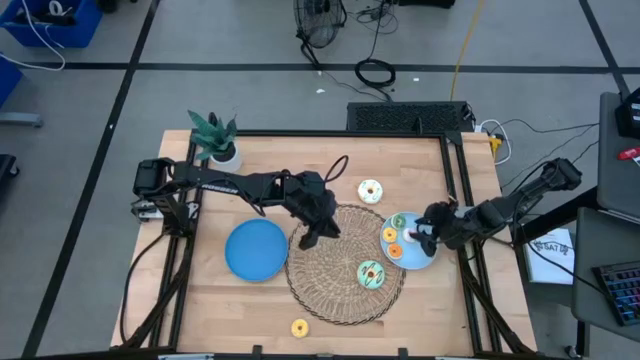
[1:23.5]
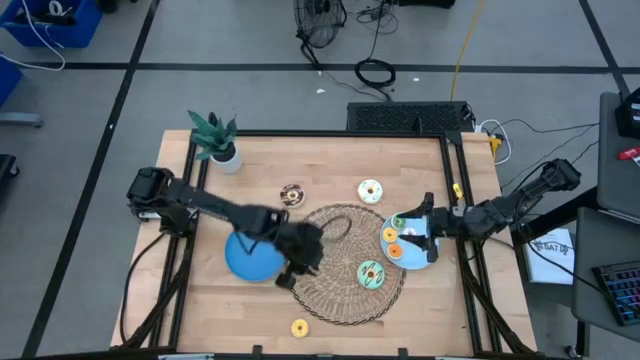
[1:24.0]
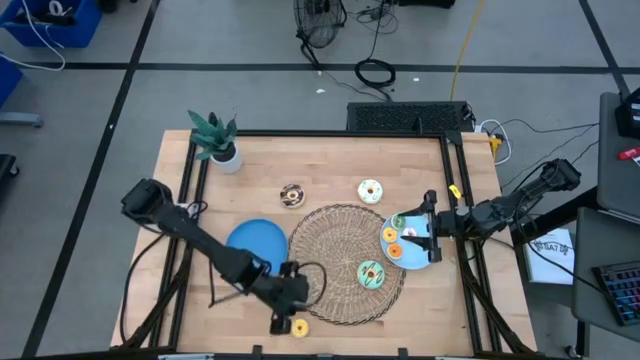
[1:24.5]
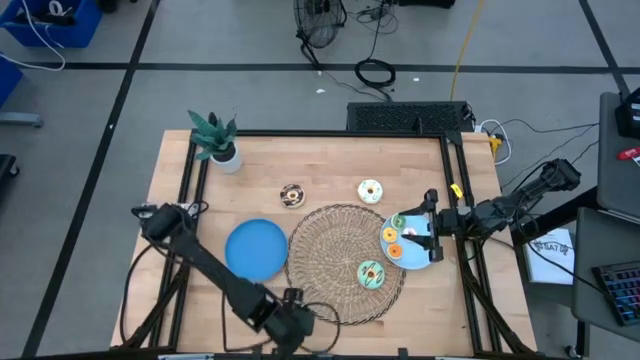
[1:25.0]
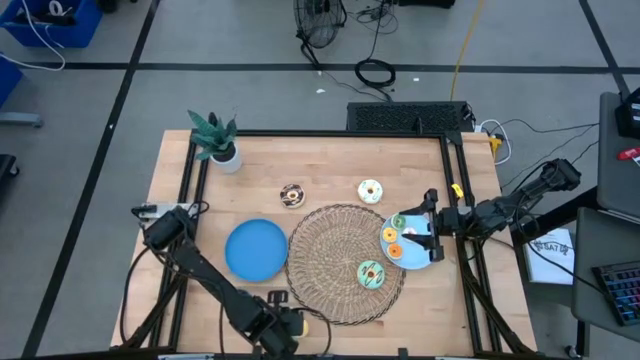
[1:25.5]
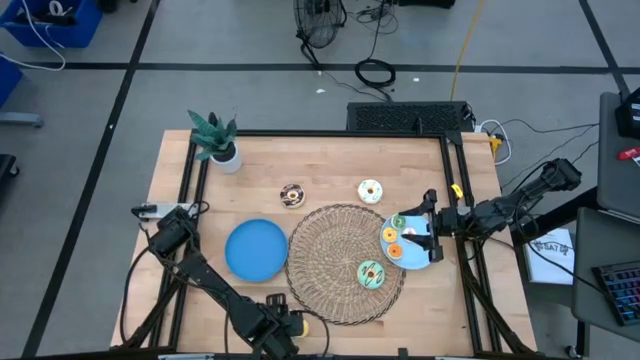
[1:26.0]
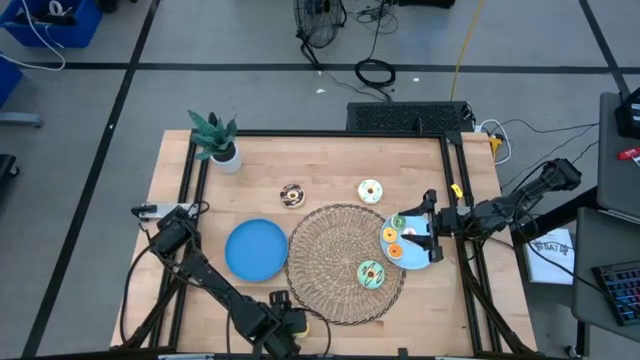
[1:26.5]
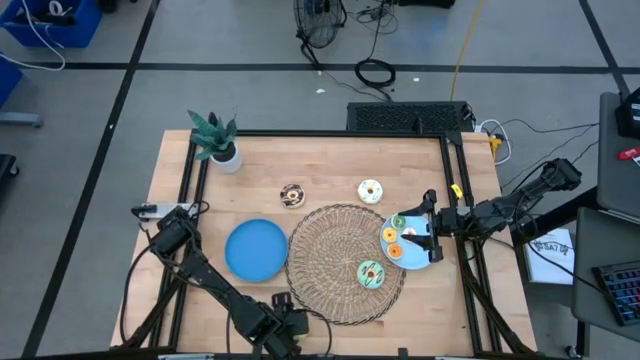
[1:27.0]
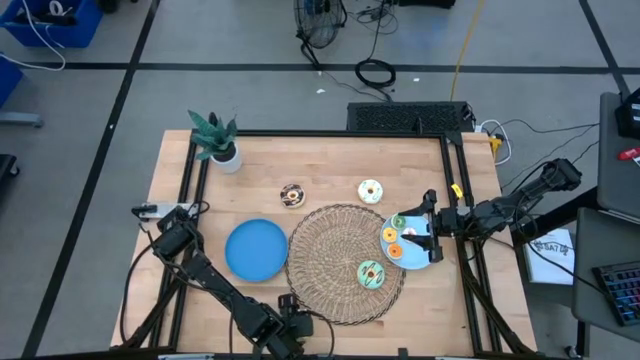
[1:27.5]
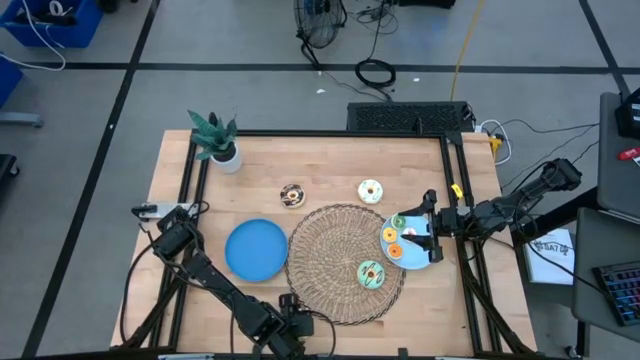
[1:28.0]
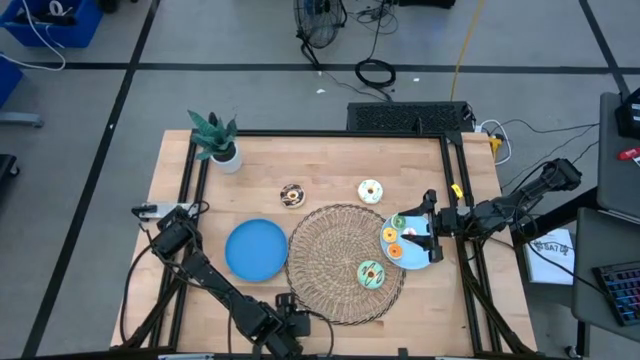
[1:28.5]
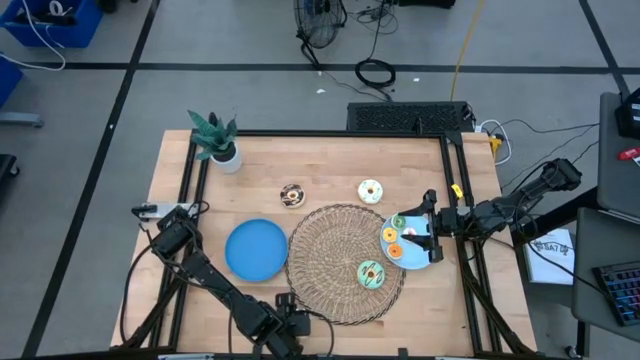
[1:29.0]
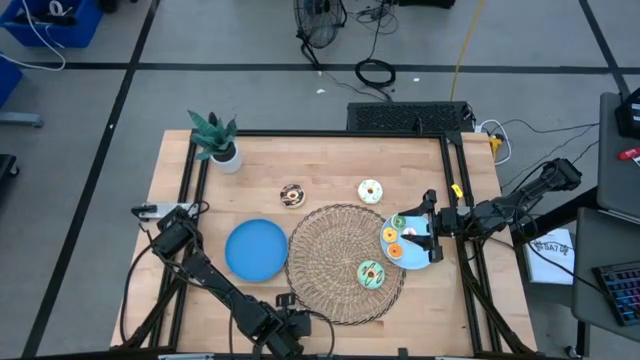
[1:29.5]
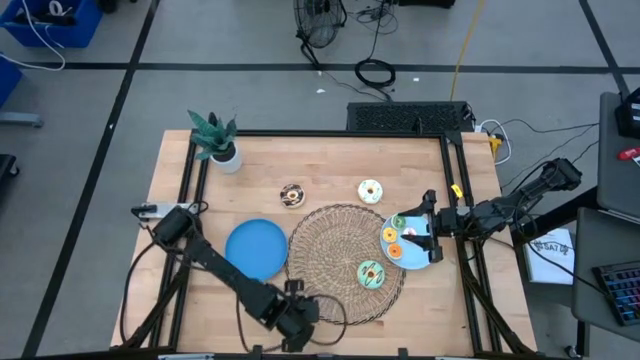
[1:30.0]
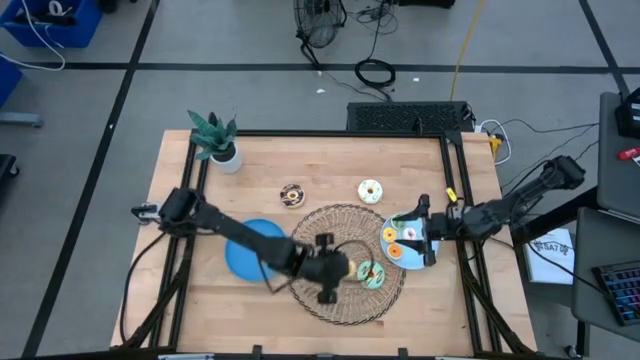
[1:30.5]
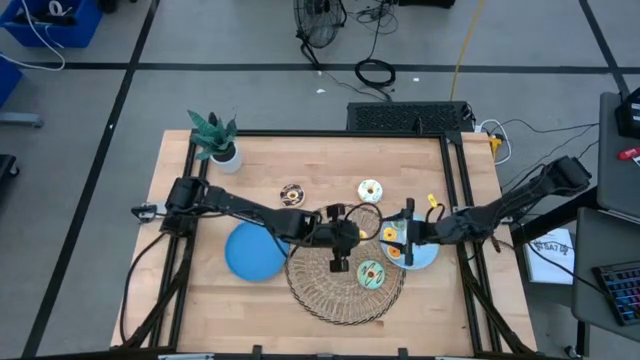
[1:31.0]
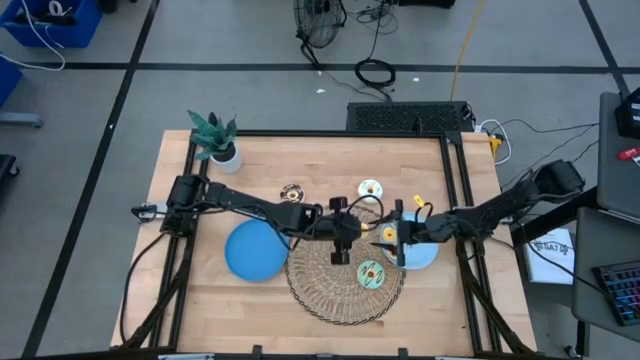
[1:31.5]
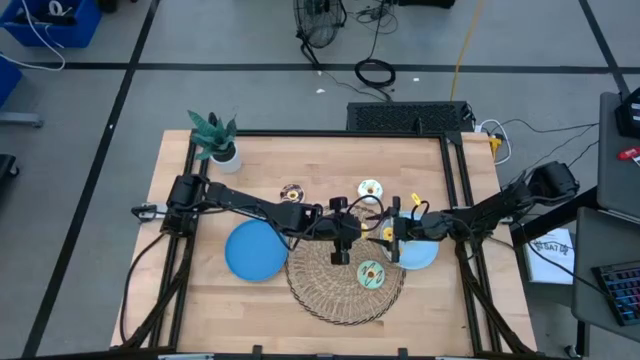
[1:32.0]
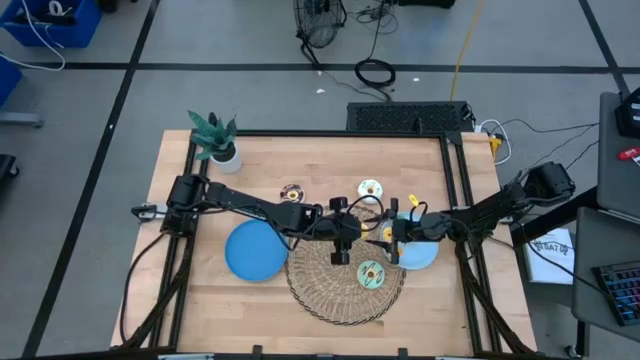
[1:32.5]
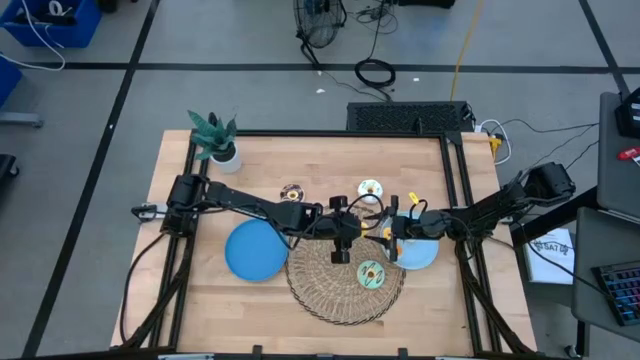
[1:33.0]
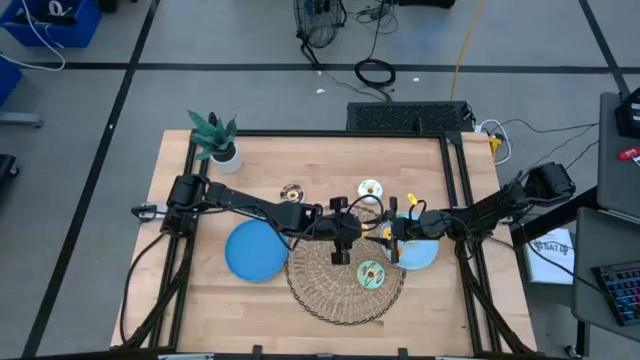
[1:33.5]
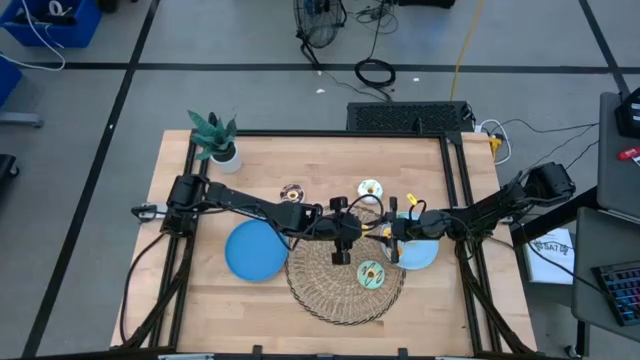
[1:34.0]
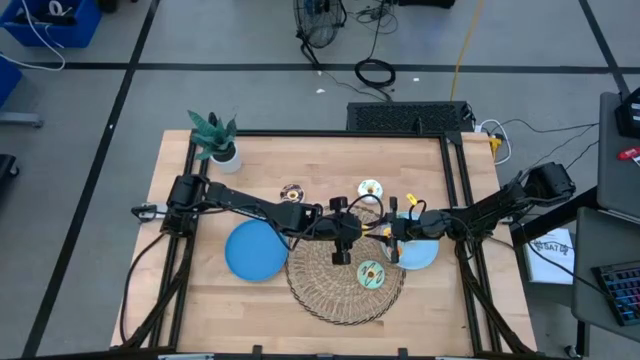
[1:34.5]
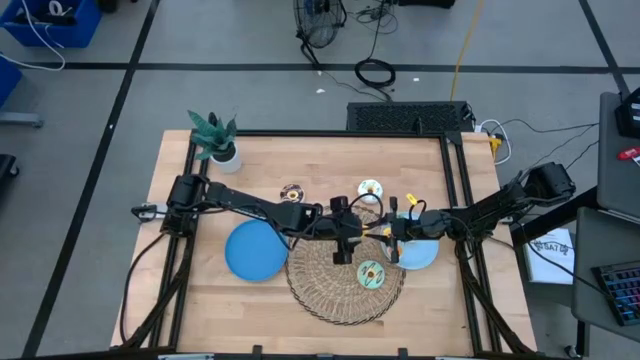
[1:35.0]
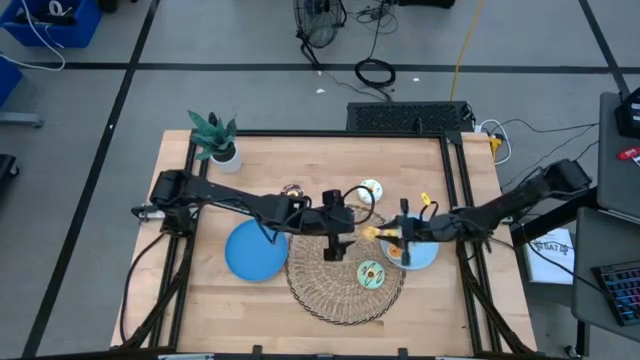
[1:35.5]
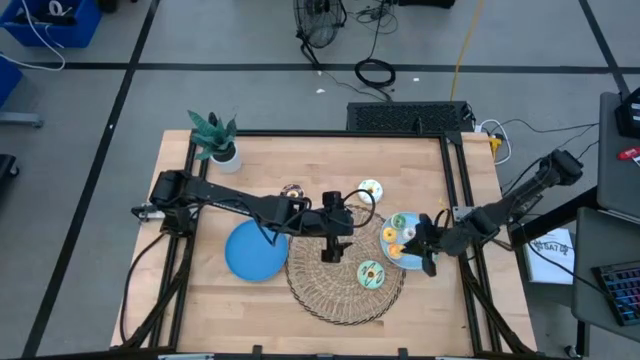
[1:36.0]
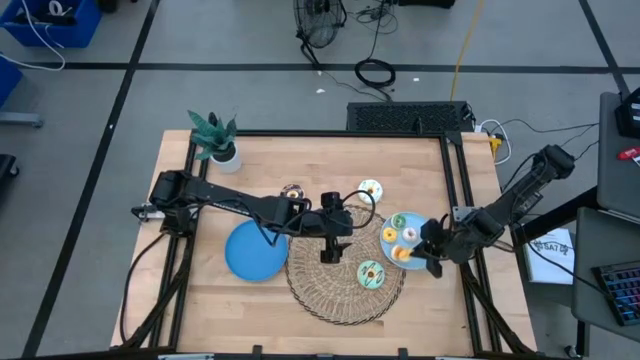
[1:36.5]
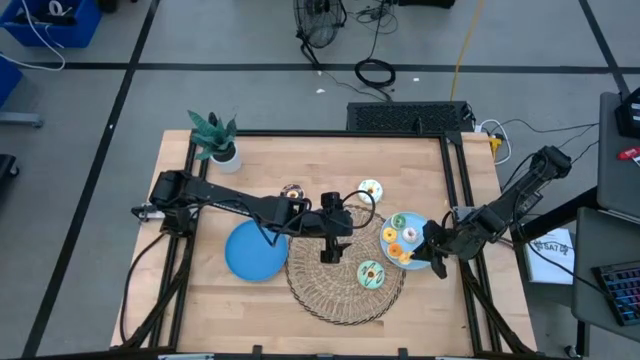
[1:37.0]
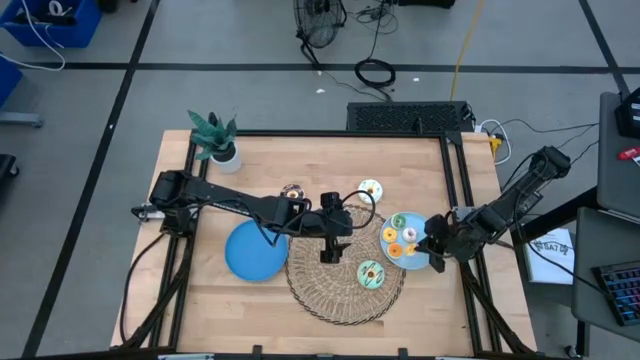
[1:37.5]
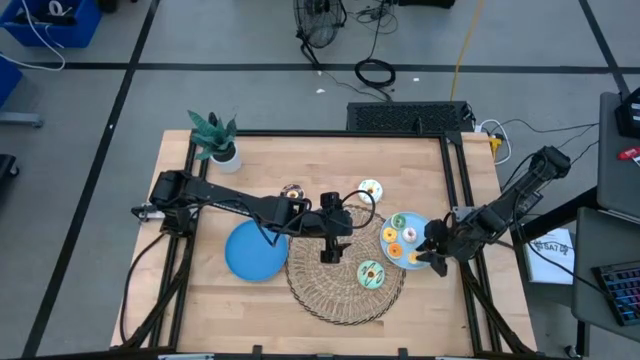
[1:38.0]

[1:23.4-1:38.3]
Task: Pick & Place donuts
Put the small yellow donut on the light blue plate
